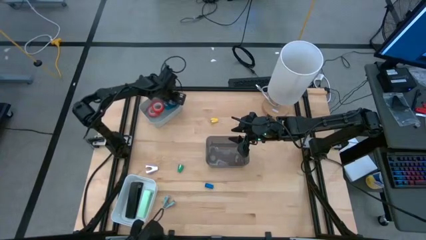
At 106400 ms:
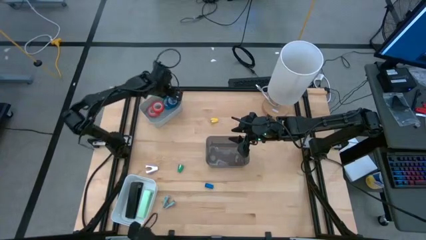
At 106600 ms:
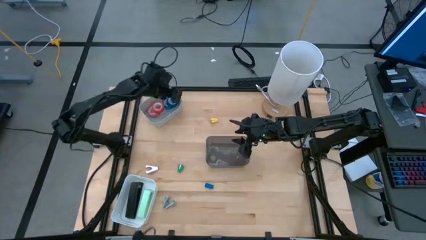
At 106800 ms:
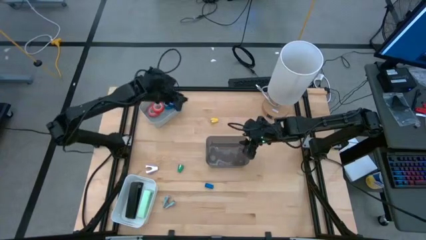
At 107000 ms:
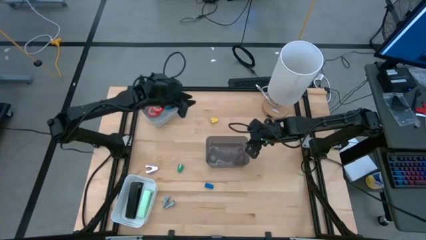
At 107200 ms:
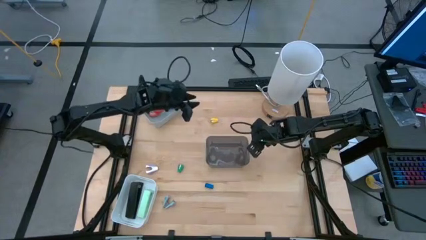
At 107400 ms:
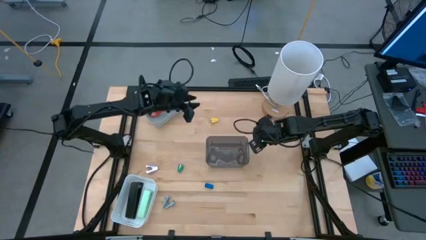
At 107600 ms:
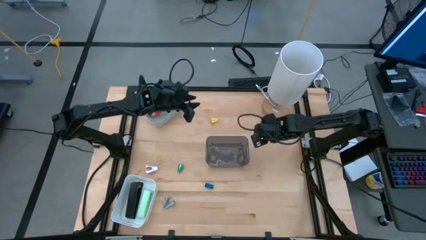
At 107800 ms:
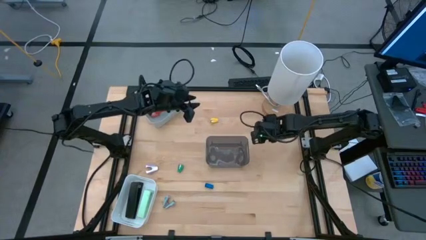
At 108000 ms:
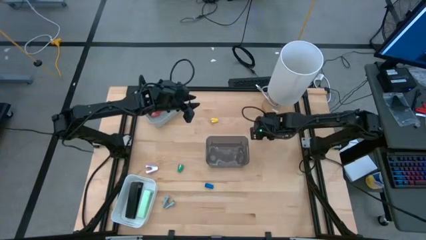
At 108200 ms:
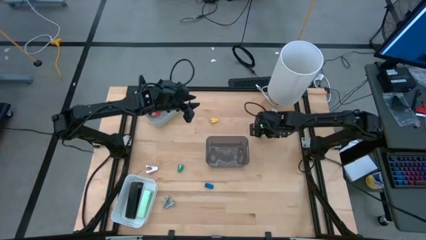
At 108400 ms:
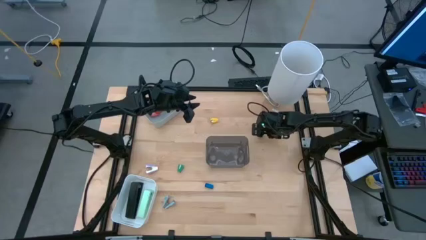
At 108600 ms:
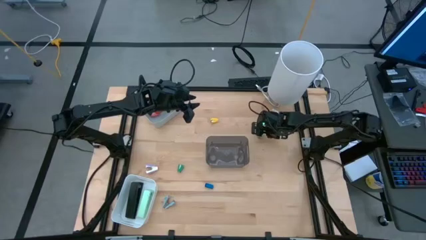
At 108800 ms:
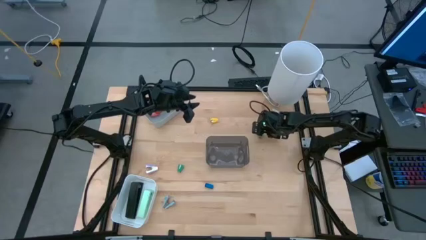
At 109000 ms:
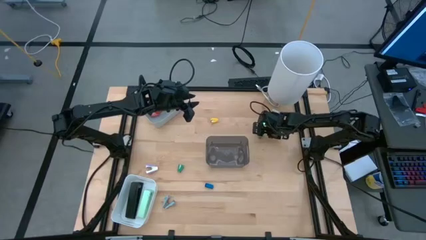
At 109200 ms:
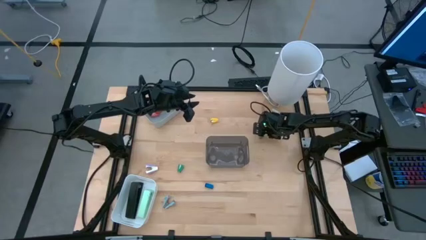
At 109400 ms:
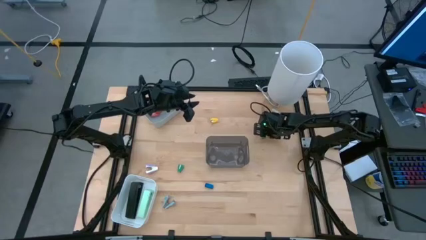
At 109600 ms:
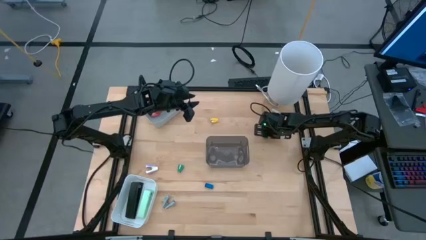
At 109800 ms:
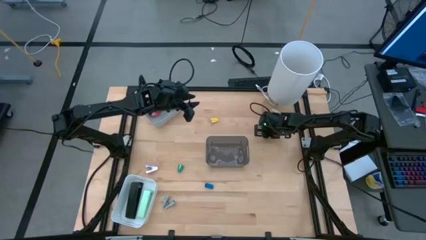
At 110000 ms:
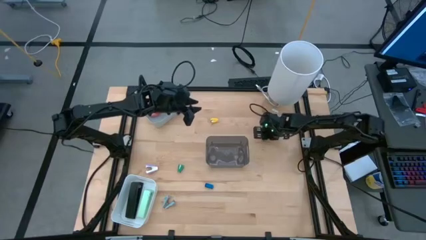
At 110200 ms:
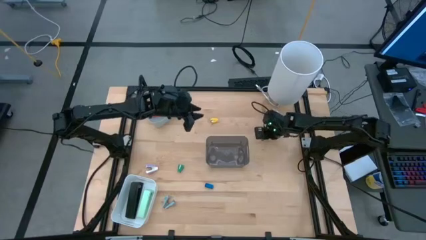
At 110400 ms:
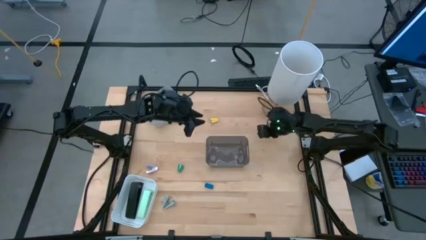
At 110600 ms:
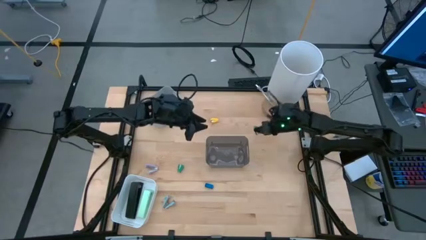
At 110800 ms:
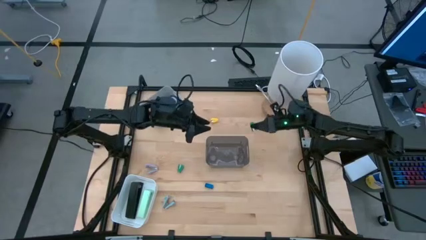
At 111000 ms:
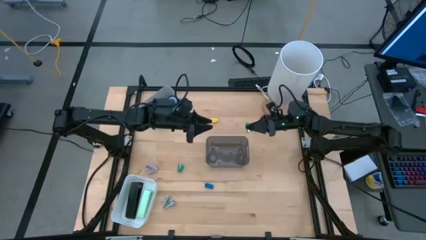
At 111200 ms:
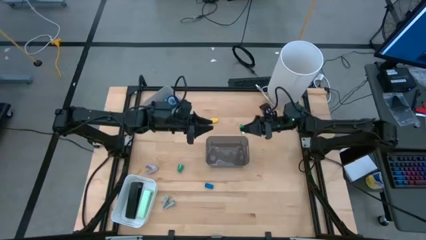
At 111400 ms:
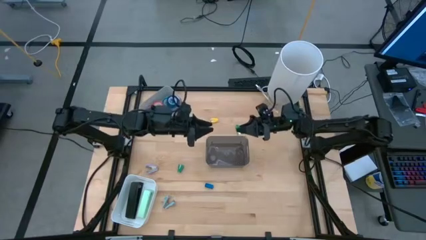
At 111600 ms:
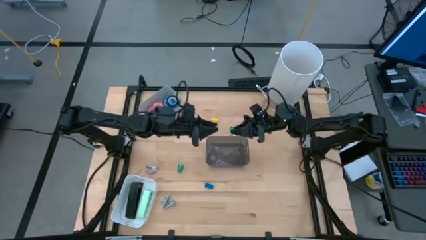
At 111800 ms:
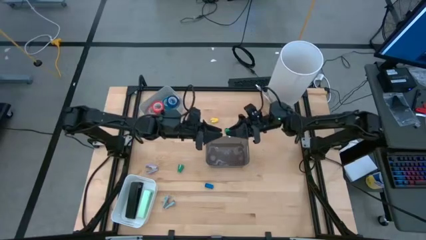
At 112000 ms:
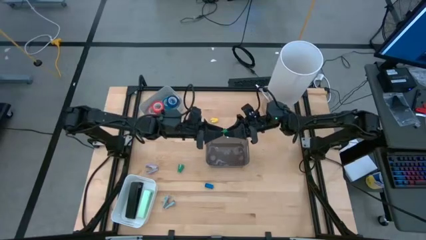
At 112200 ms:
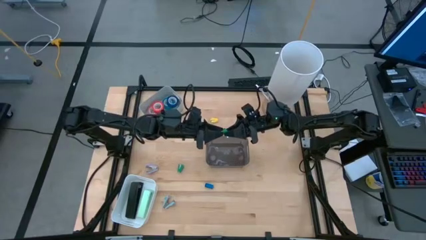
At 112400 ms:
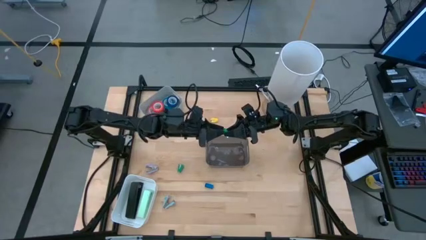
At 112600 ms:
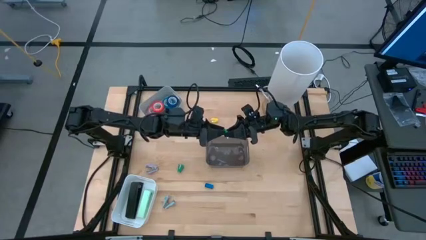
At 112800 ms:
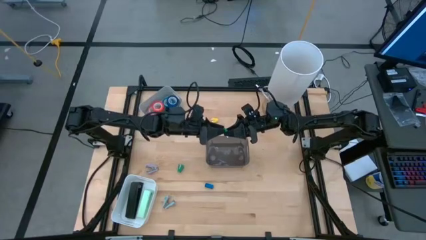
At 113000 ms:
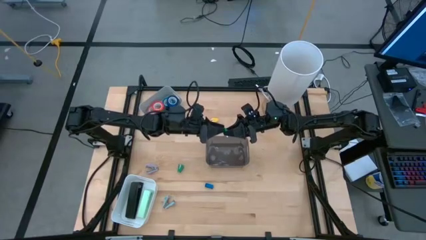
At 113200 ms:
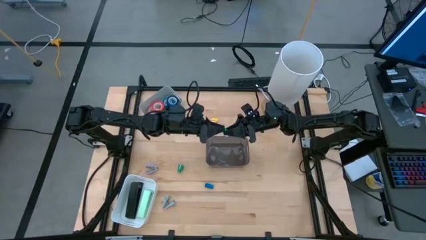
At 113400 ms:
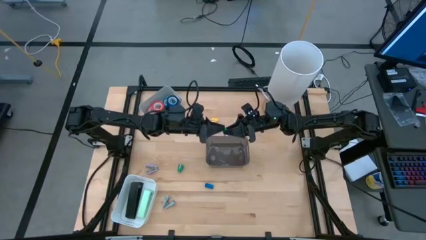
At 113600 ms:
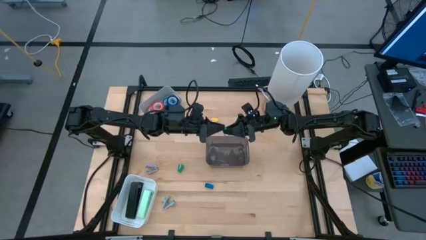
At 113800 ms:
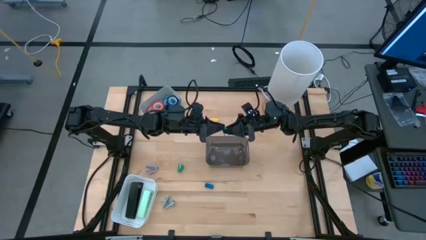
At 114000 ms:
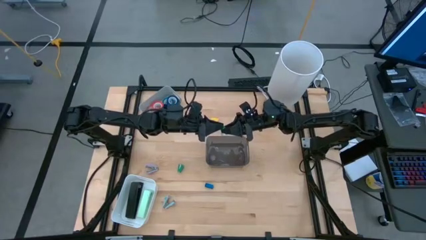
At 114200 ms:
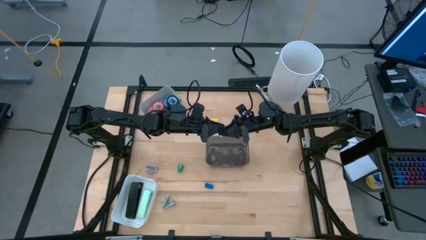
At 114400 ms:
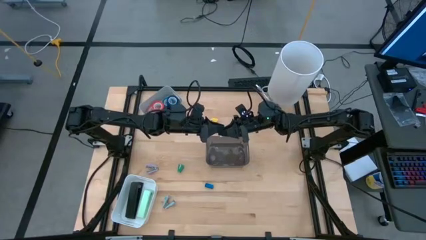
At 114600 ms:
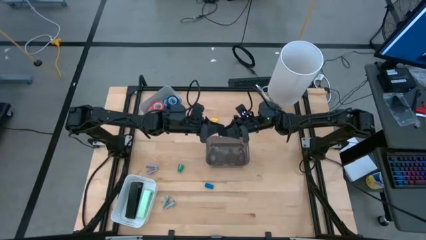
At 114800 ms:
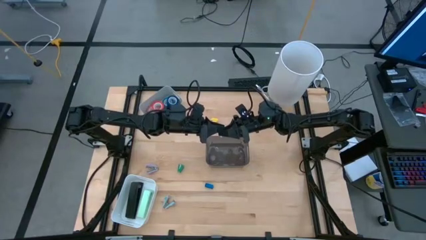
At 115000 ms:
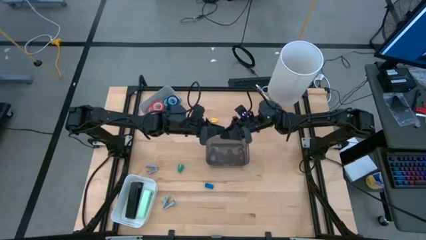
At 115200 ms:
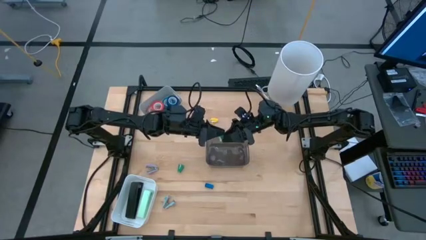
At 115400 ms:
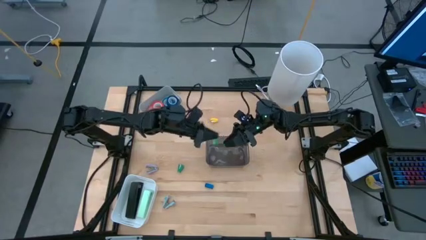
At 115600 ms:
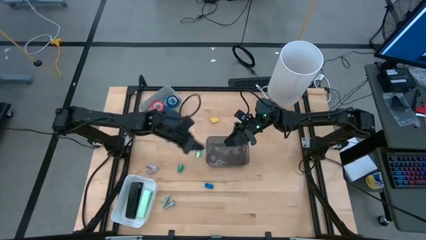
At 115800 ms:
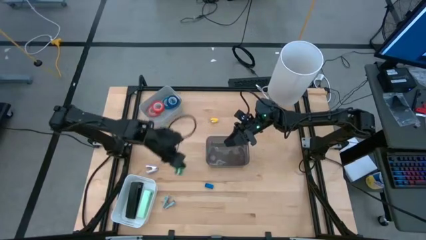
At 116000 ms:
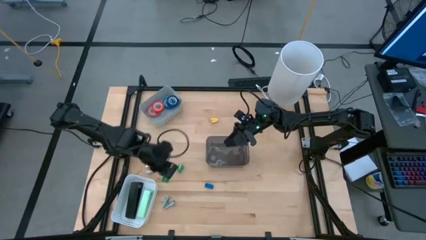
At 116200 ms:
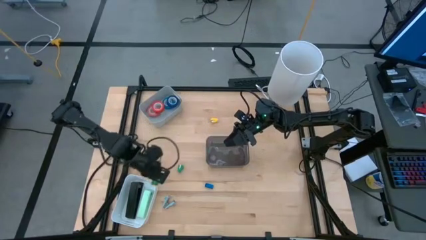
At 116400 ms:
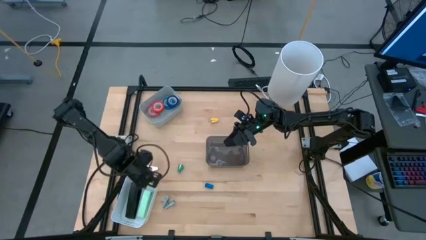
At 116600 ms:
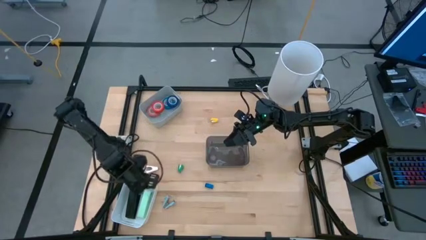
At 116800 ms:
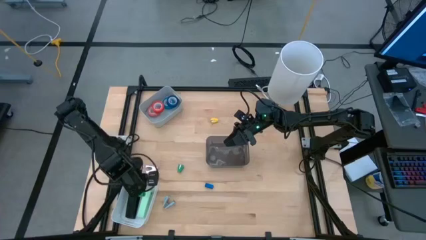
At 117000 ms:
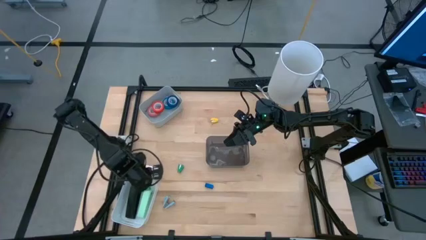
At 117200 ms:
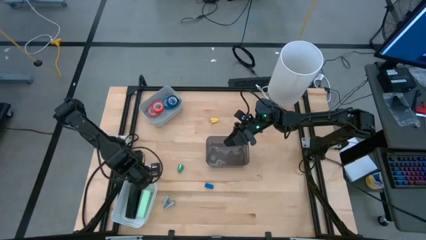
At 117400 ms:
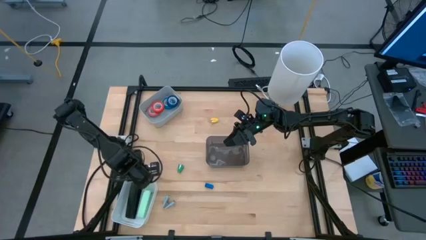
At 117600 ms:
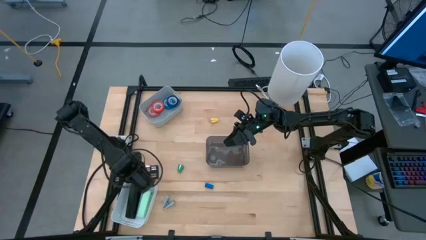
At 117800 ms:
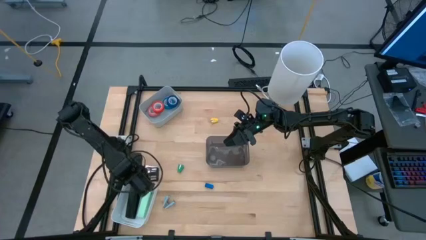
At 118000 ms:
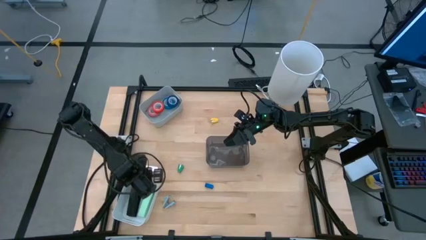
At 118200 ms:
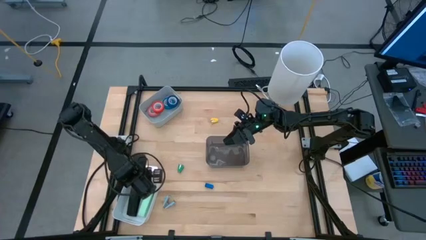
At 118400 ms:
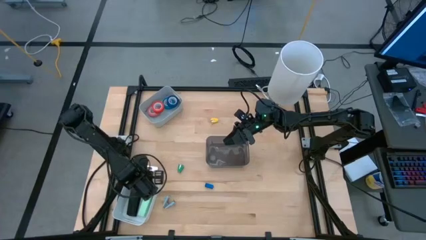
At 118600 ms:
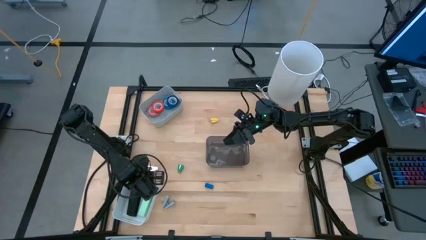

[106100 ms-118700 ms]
Task: Pick and place Stapler, Stapler remover, tape
Put the small dark green stapler into the white bin

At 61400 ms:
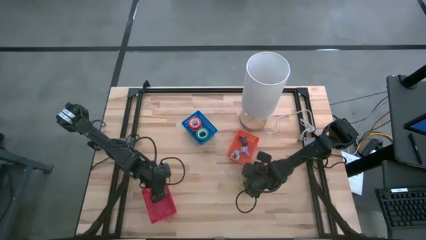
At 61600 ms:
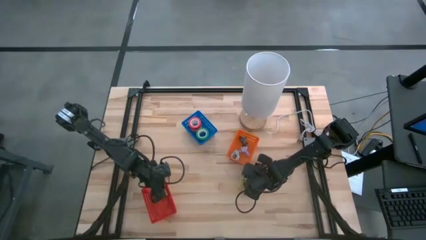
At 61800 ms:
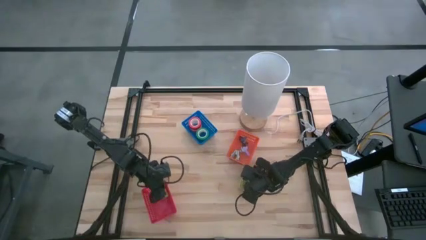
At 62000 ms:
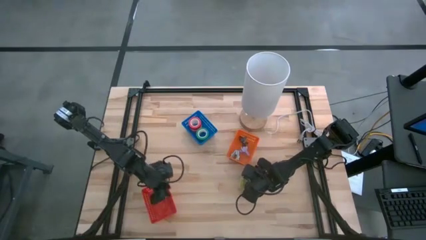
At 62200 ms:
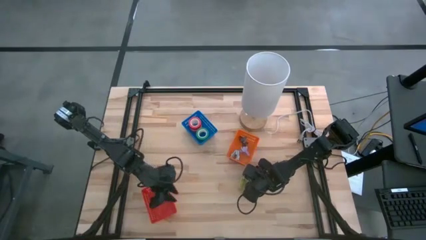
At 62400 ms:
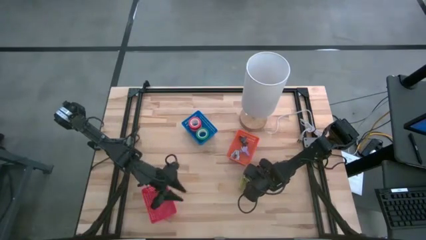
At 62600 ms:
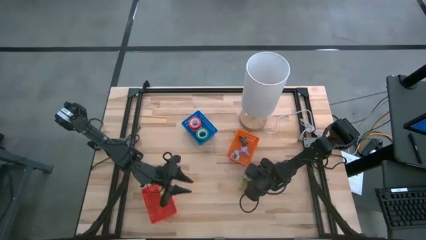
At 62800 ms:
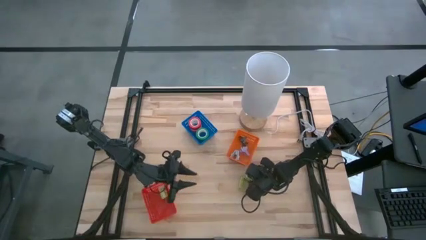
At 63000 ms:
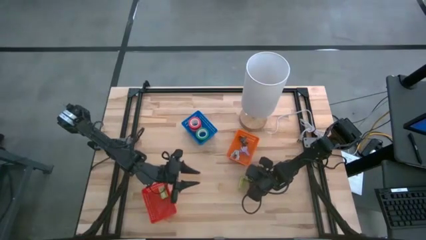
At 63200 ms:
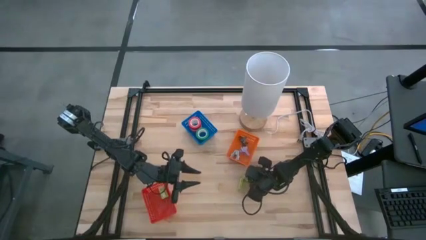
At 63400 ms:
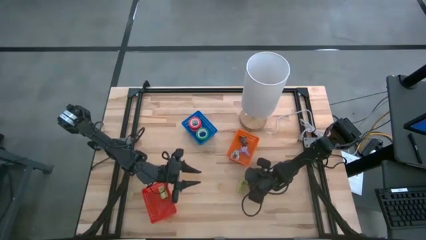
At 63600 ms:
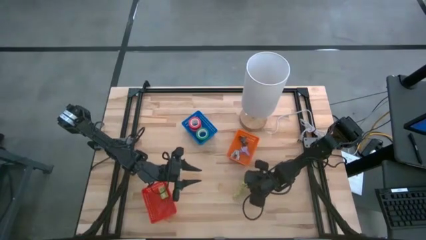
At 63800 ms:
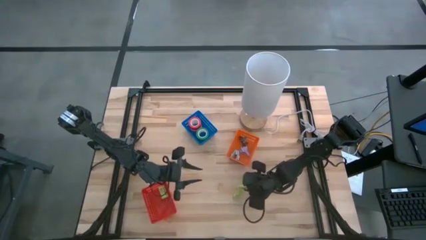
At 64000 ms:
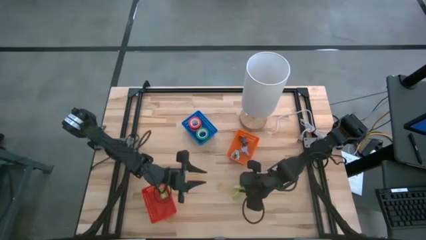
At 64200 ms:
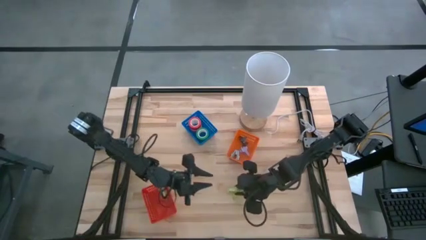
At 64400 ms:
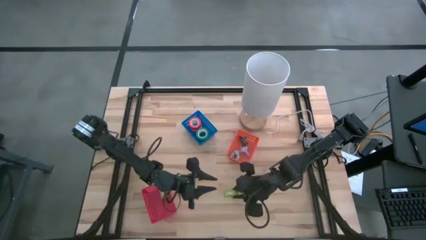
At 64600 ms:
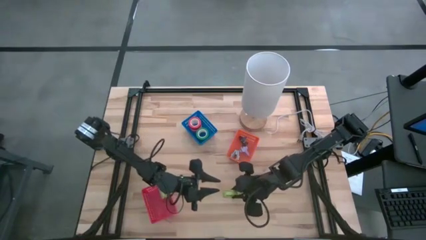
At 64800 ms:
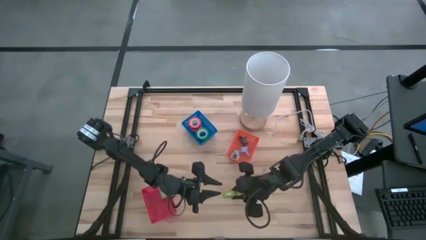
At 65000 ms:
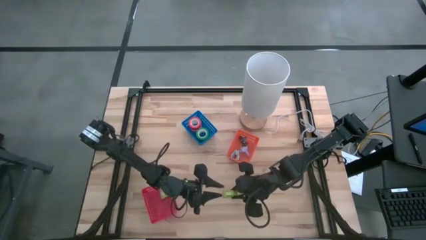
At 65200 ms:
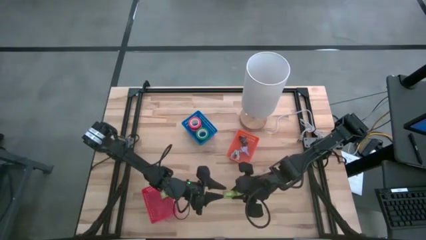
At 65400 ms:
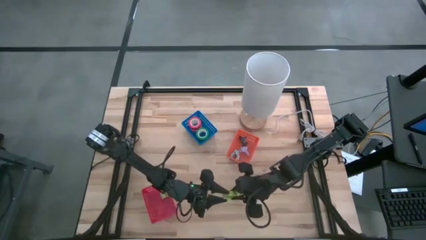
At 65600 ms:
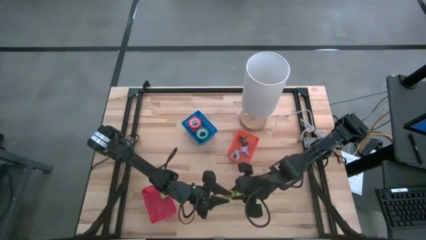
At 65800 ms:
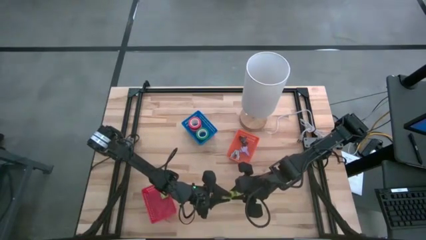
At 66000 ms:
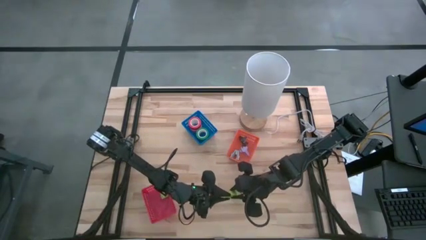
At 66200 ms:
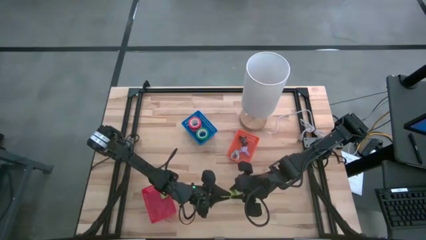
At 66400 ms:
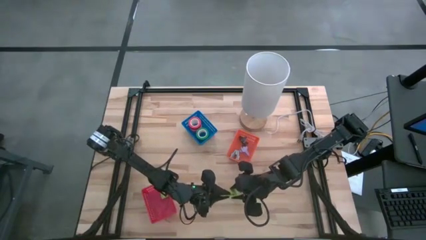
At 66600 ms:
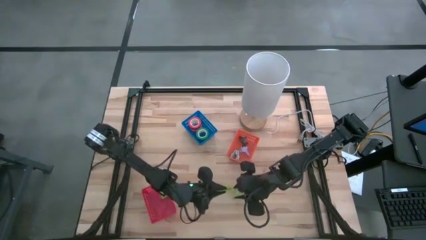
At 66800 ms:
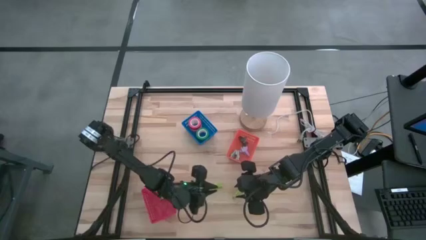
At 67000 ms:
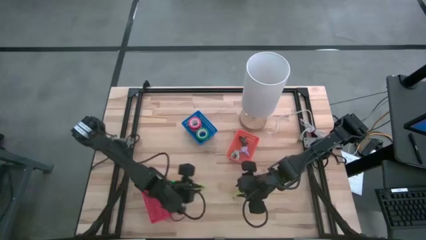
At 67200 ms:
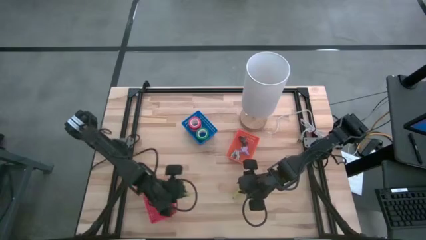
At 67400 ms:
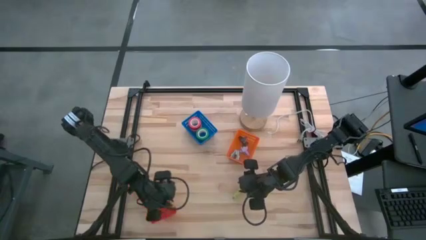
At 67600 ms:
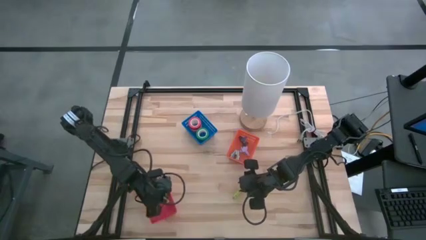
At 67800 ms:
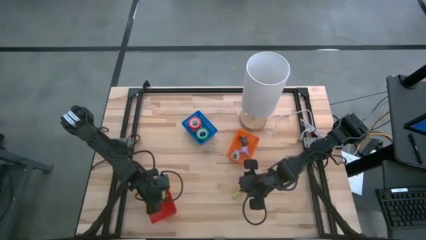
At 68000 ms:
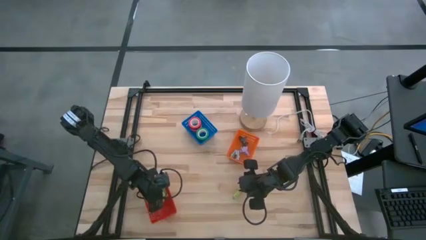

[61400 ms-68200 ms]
Task: Pick and place Stapler, Stapler remover, tape
Put the green staple boxed into the red basket
